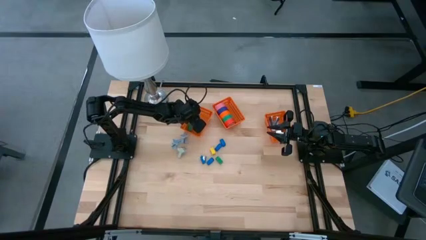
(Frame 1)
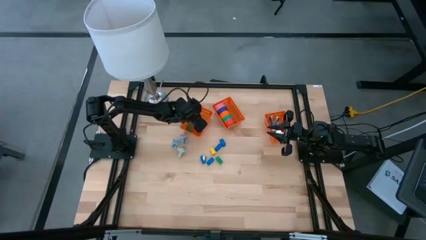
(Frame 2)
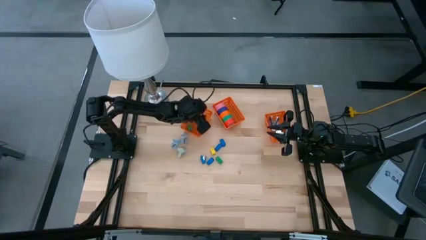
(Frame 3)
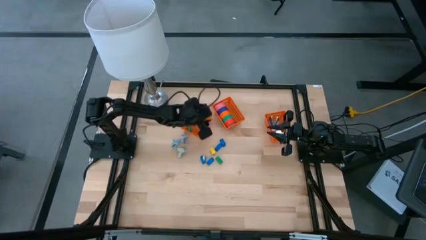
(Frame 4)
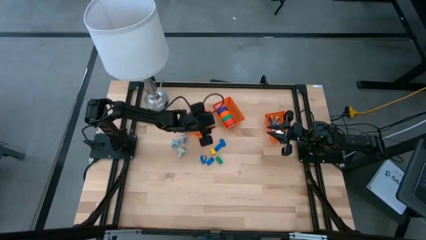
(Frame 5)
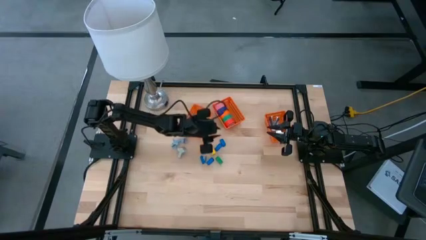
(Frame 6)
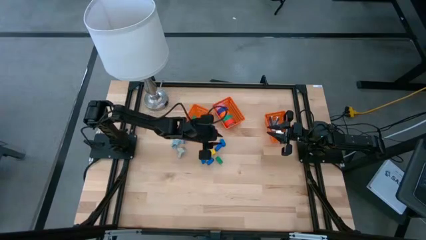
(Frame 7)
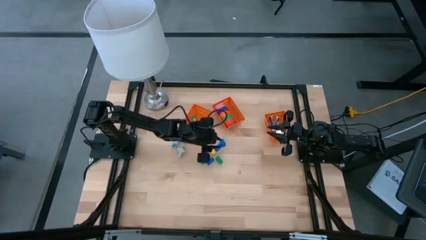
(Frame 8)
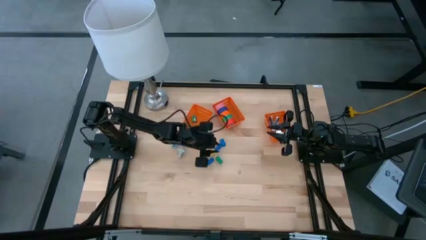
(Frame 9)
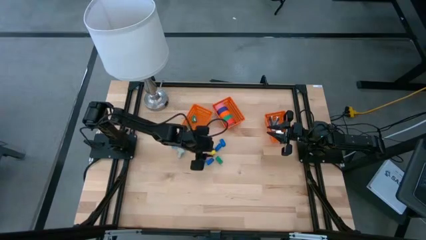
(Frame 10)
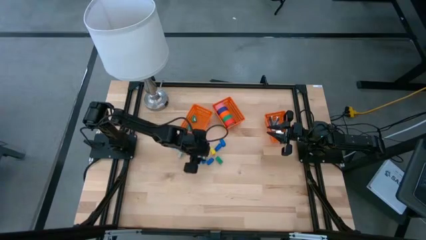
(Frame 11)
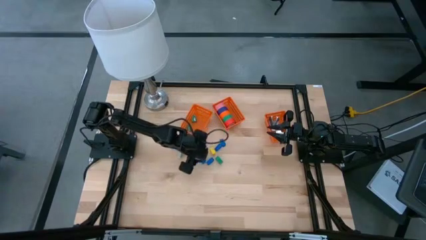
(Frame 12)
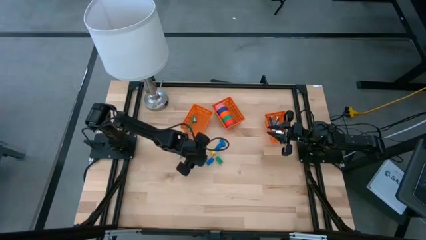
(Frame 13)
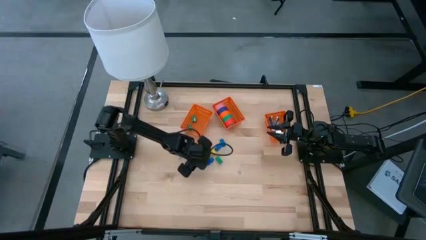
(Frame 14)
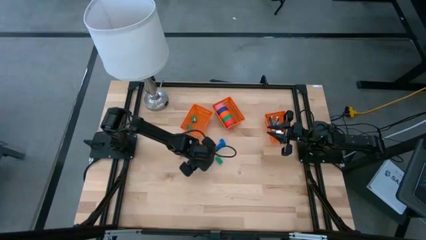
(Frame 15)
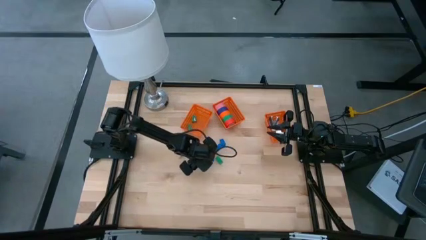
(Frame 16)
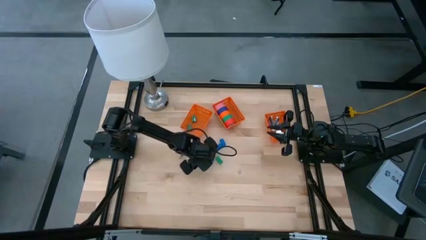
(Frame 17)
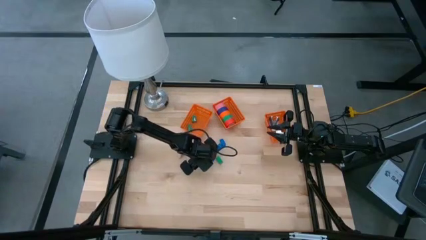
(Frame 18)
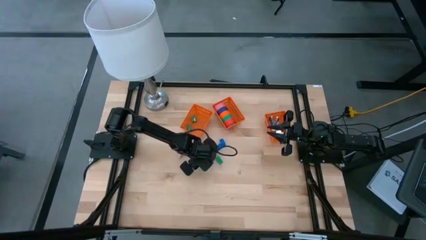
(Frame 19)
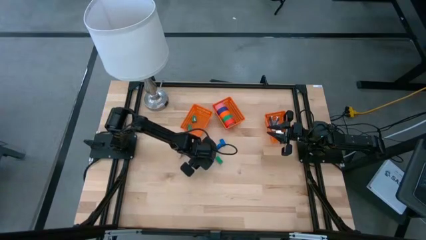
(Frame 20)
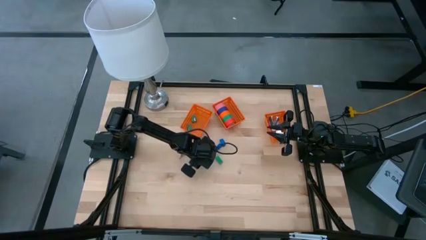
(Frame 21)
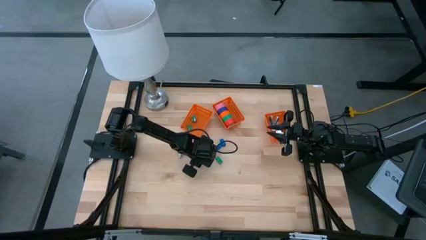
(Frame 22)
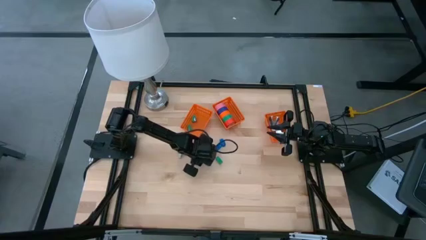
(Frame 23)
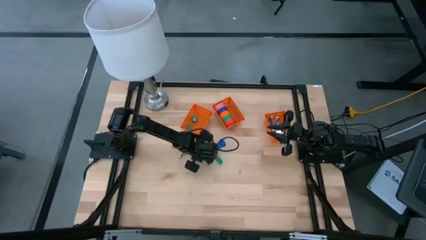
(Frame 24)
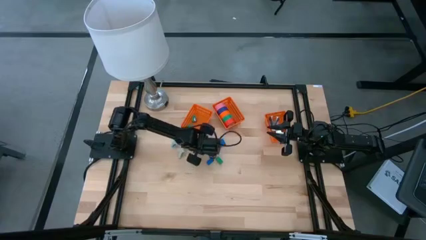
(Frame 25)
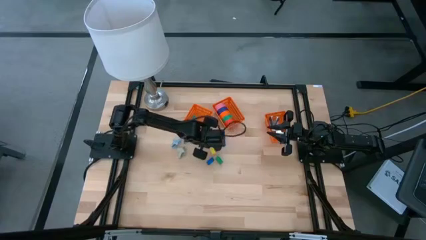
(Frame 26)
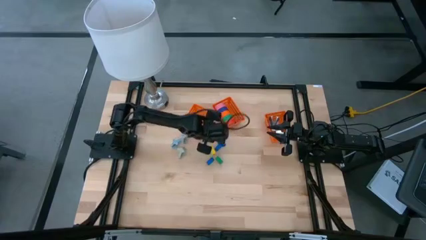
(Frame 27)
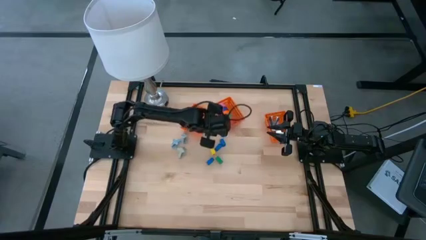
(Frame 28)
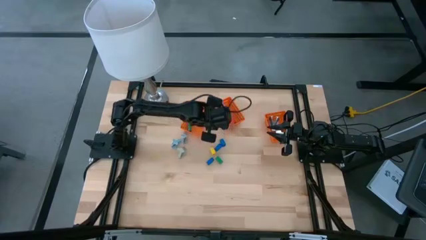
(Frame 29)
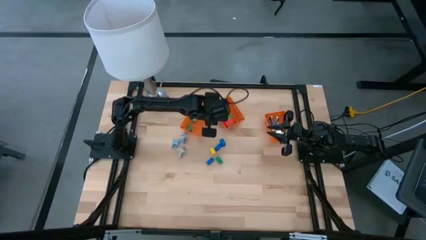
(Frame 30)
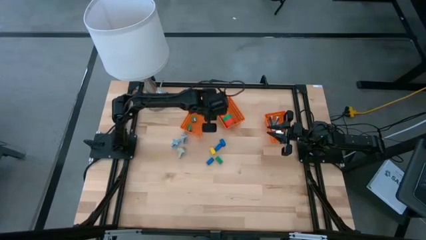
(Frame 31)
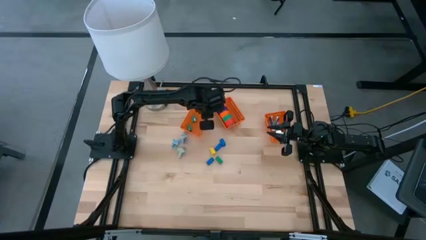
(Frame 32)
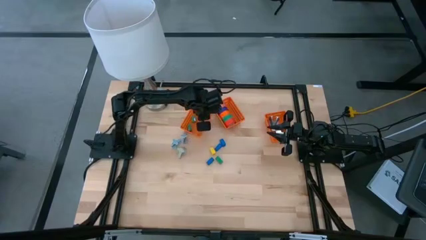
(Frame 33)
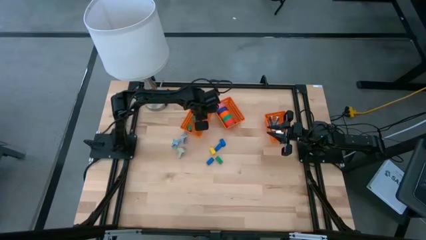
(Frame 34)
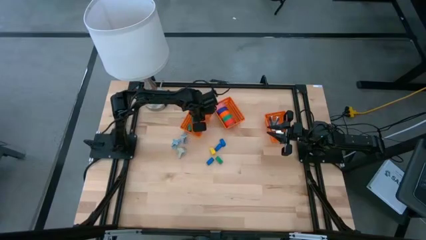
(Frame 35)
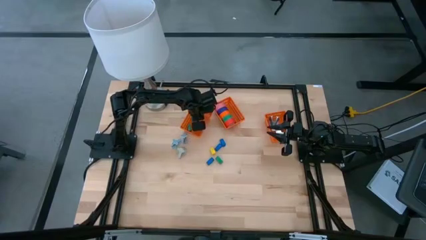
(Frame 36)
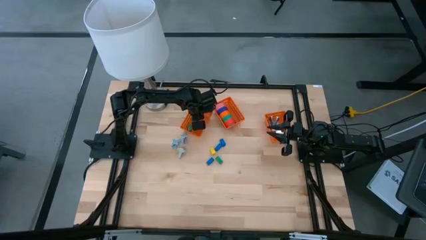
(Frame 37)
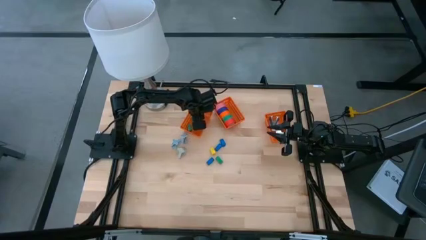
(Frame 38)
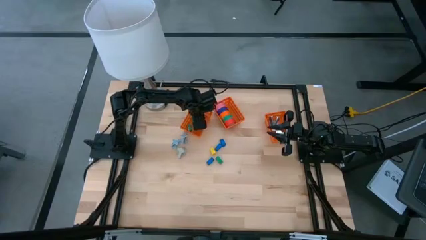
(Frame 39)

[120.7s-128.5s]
Task: Pick and place Stapler, Stapler remover, tape
Put the blue stapler into the left orange bin

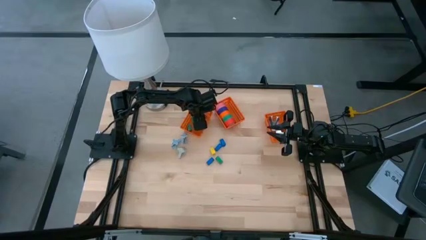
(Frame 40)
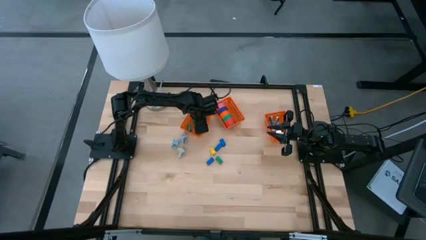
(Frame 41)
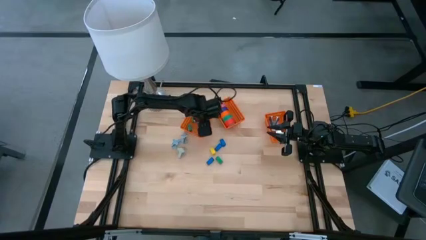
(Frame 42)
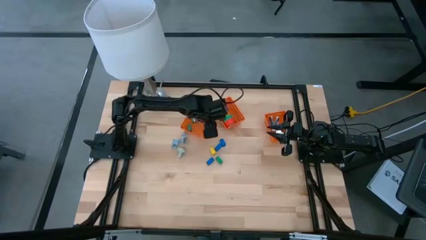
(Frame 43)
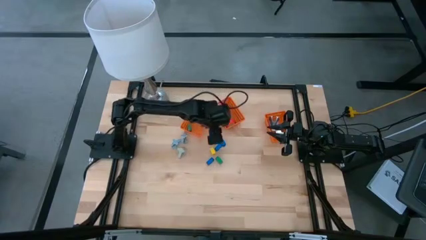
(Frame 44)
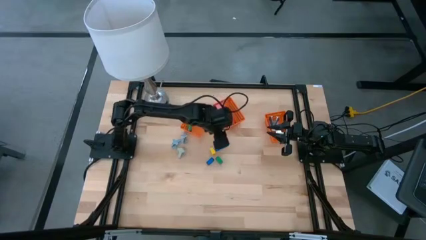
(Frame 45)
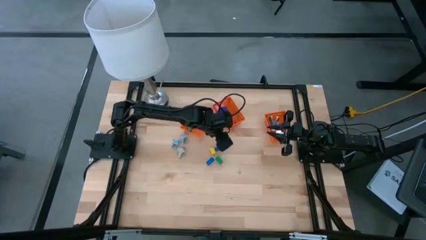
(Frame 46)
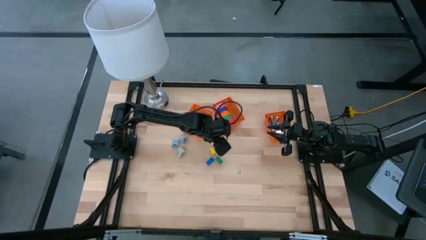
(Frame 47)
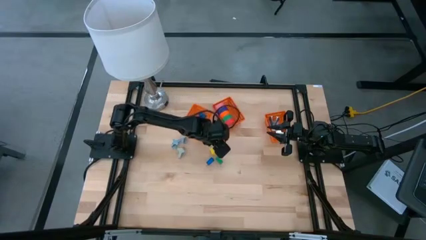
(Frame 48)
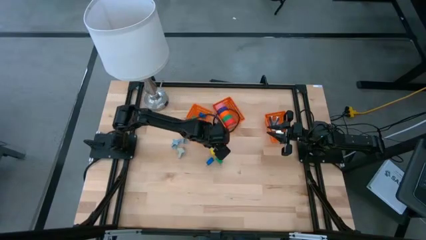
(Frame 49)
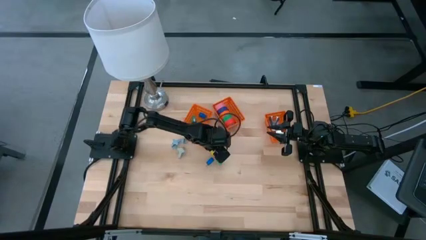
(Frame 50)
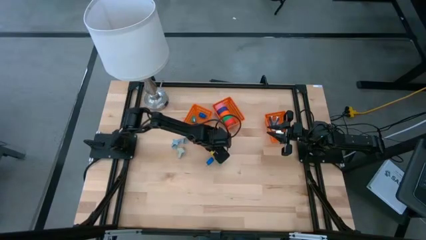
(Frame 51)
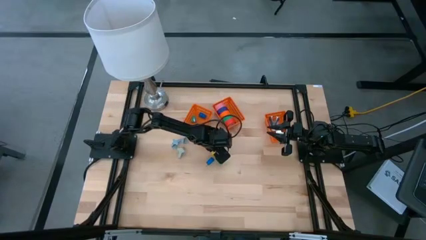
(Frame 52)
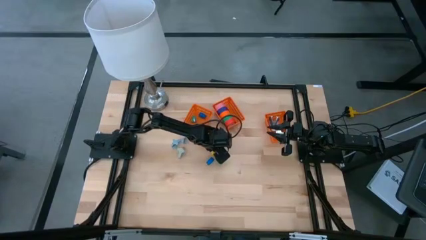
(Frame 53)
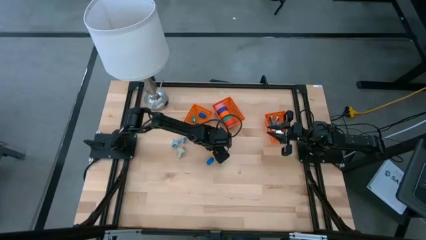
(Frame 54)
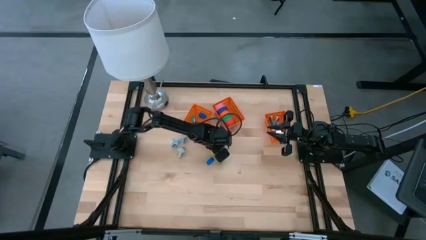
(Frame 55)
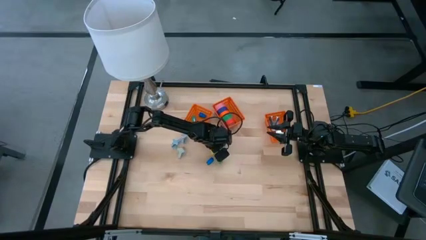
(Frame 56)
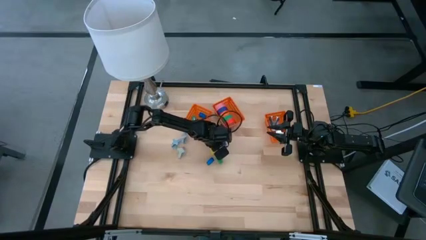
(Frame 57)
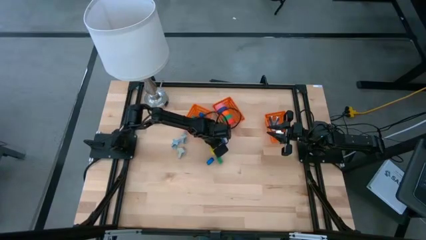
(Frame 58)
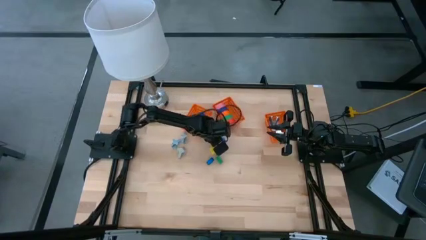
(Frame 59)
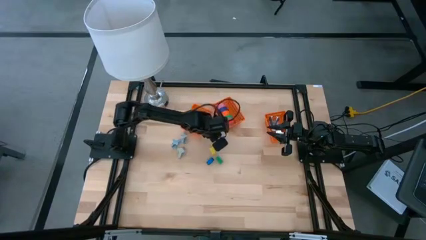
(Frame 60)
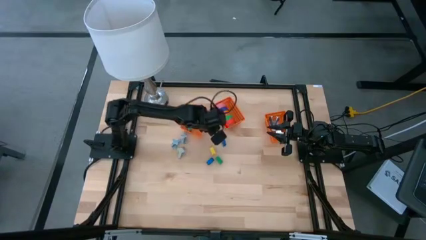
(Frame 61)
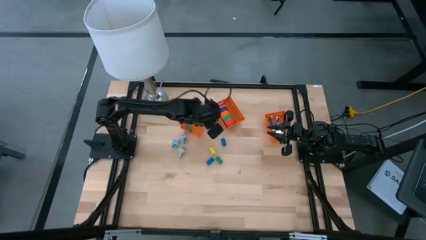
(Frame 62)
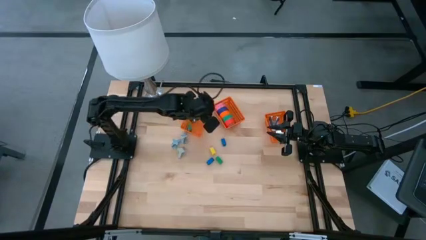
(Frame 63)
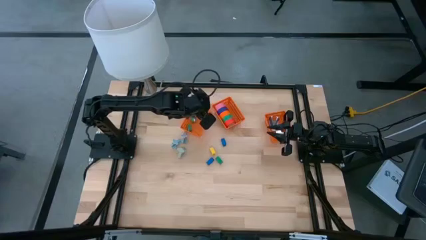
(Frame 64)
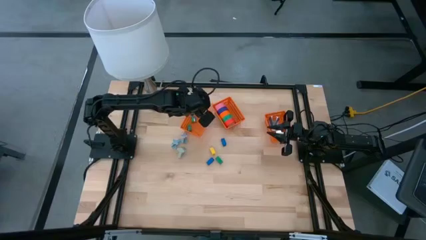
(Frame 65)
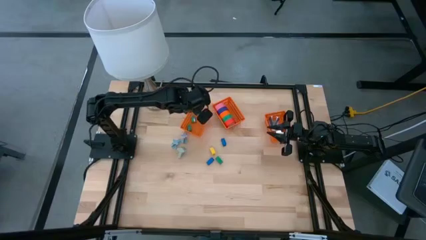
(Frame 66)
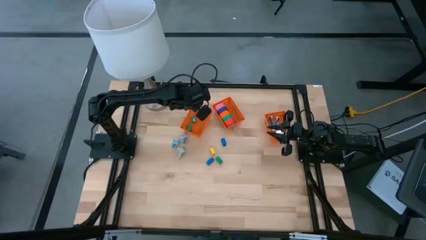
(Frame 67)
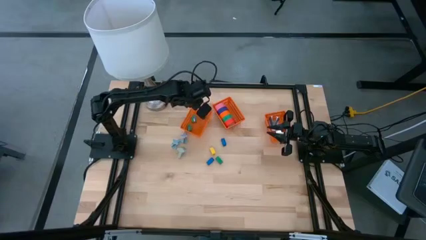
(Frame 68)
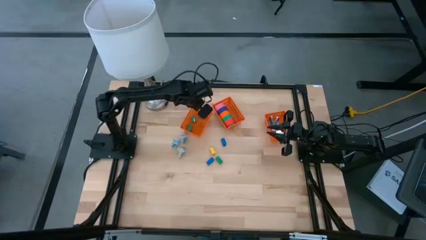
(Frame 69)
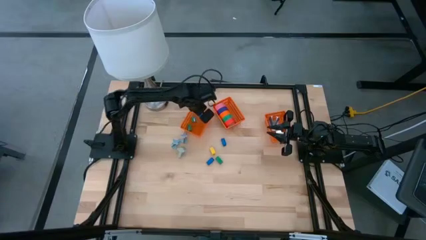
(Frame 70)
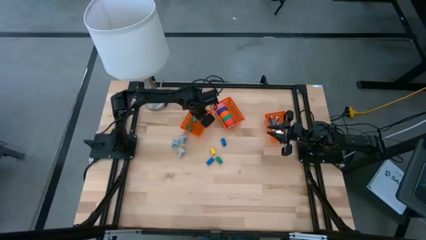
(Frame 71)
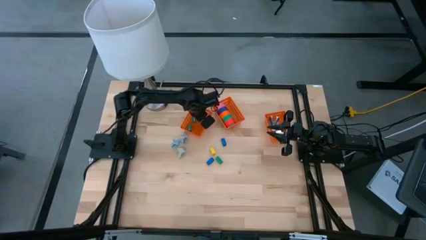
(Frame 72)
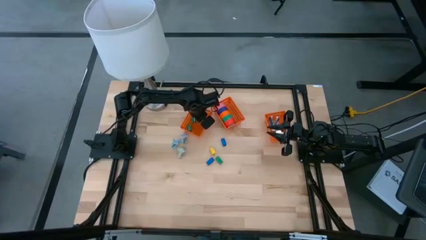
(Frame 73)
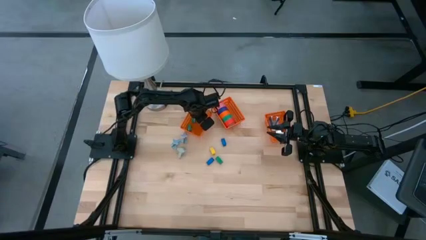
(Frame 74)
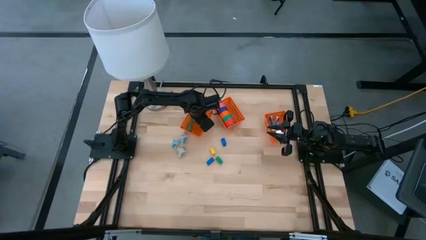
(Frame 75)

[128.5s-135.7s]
Put the blue stapler into the left orange bin
